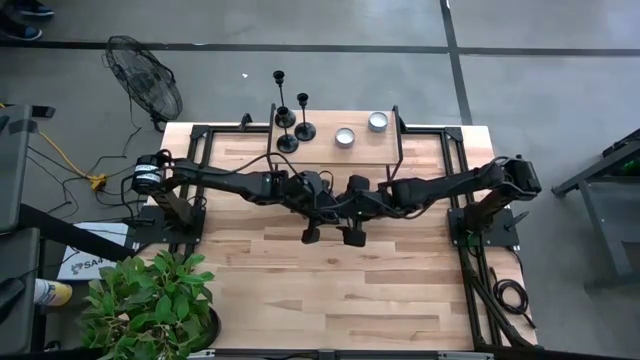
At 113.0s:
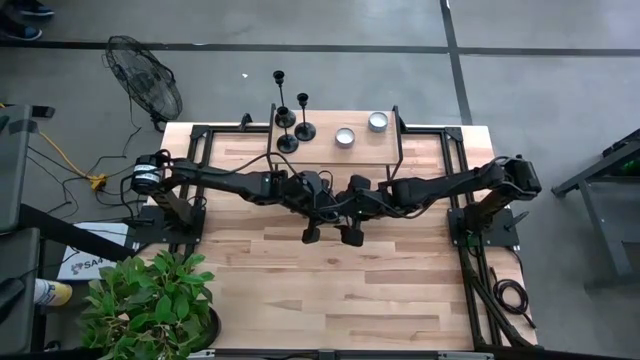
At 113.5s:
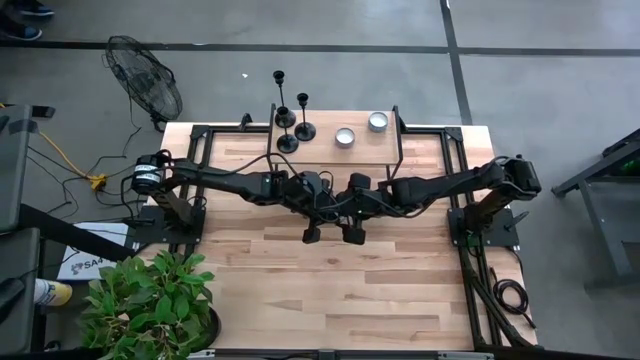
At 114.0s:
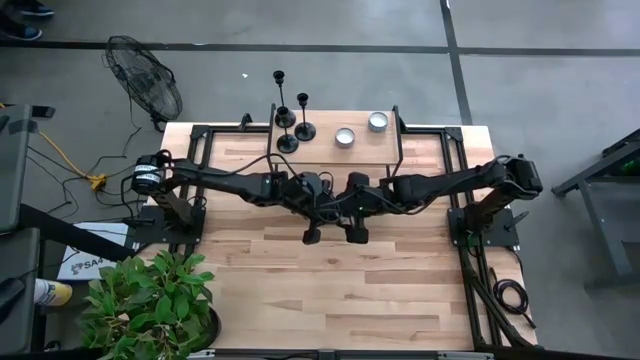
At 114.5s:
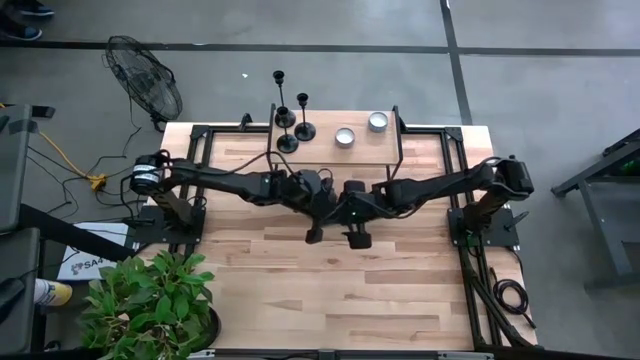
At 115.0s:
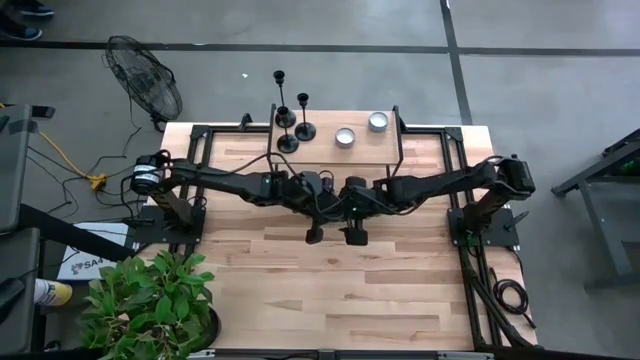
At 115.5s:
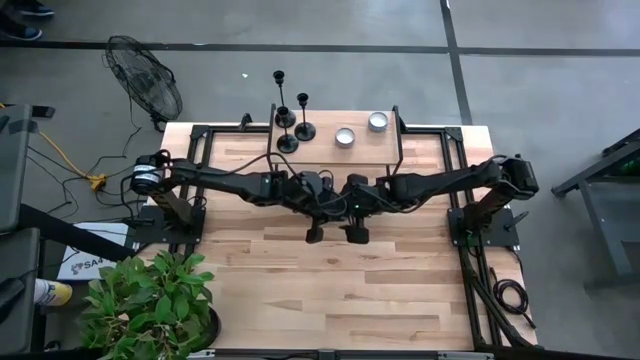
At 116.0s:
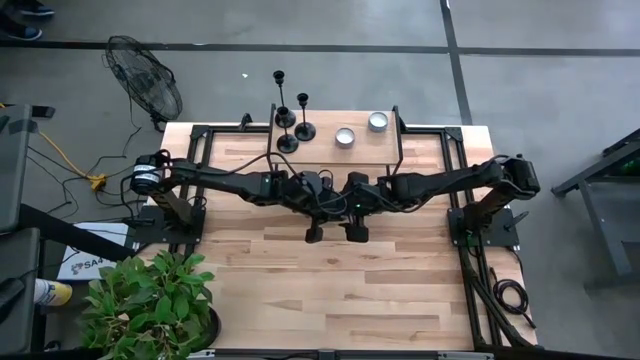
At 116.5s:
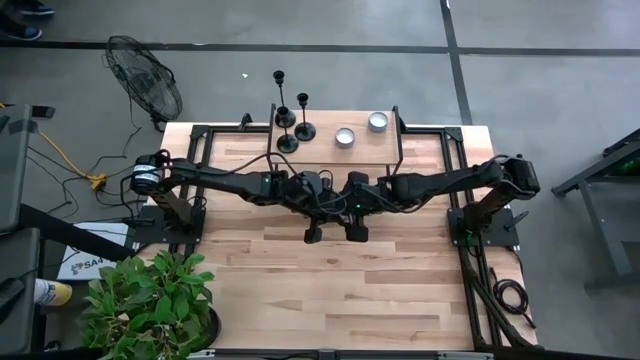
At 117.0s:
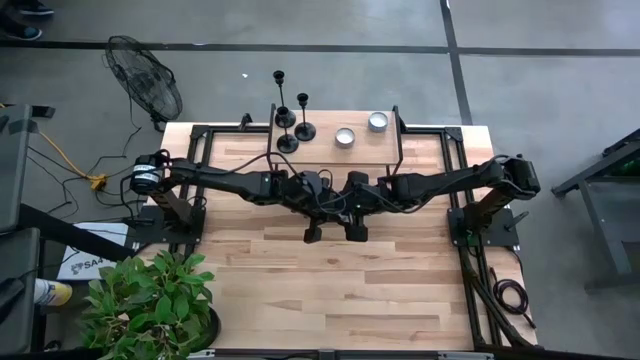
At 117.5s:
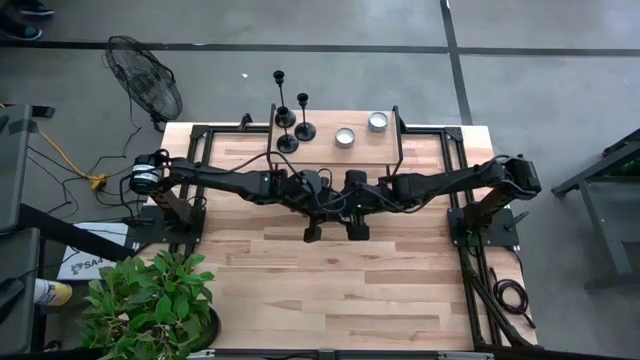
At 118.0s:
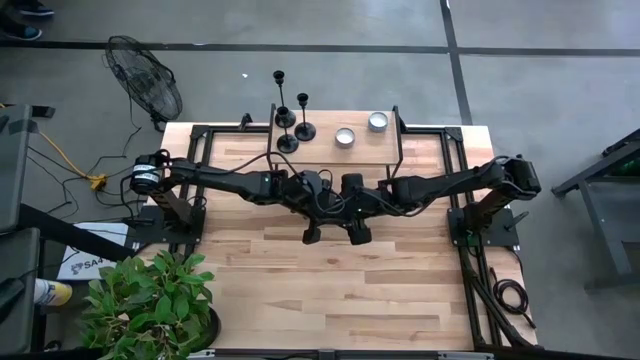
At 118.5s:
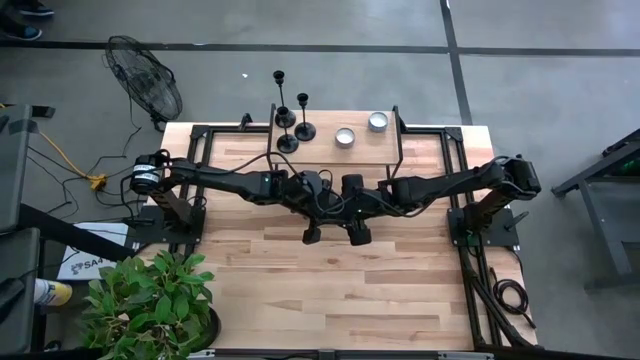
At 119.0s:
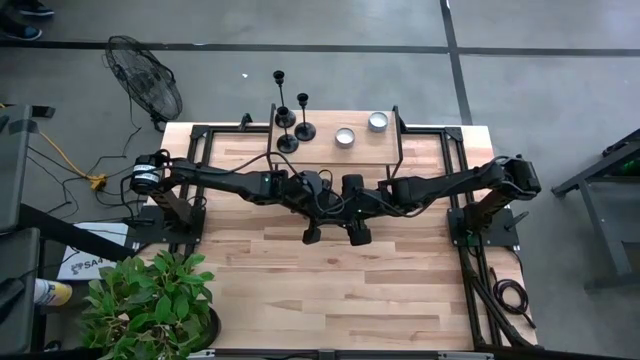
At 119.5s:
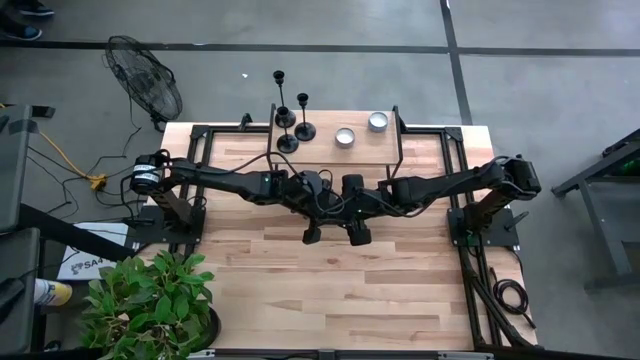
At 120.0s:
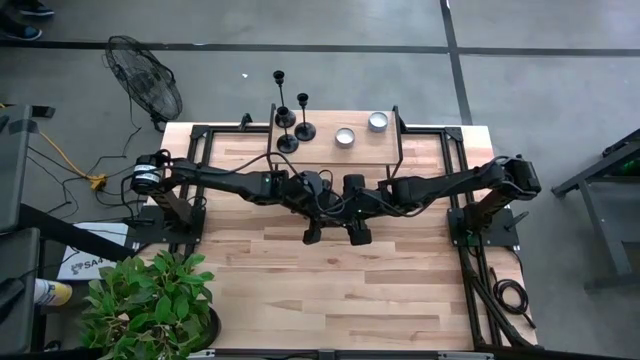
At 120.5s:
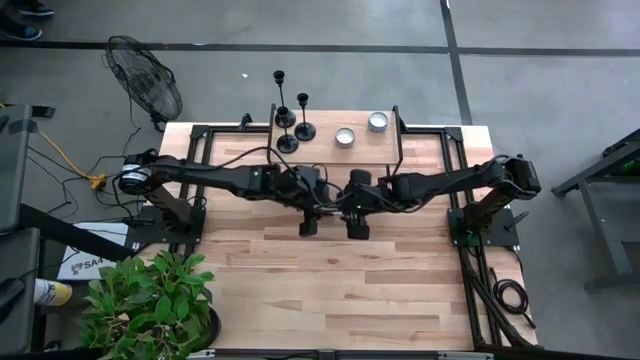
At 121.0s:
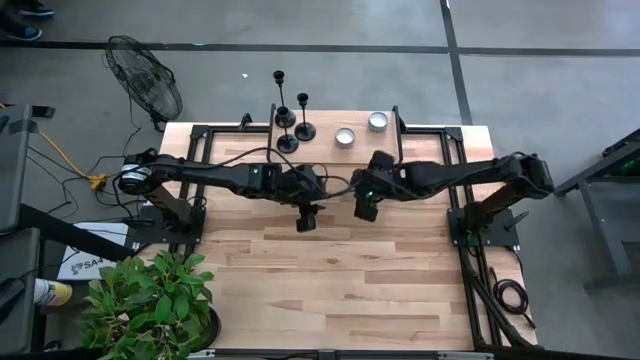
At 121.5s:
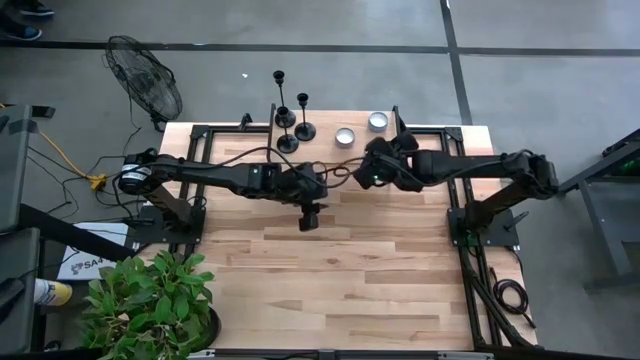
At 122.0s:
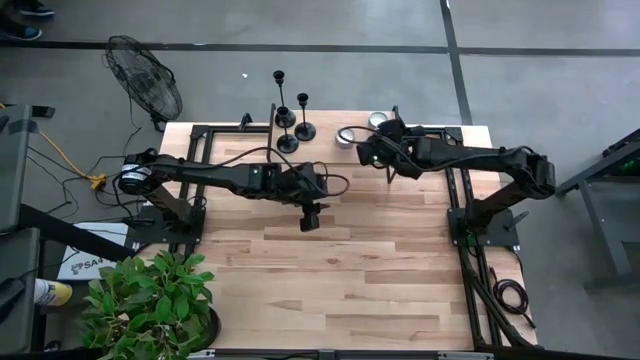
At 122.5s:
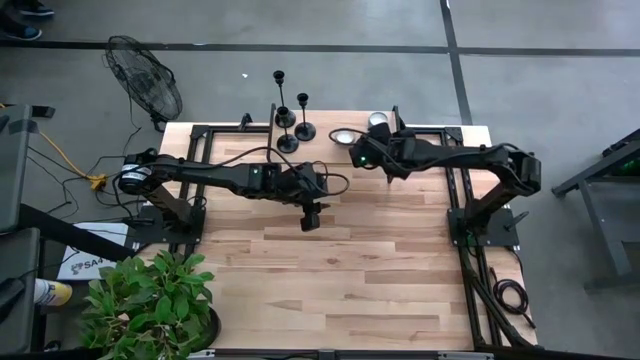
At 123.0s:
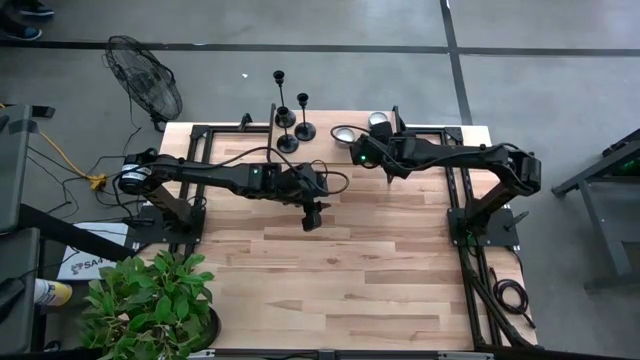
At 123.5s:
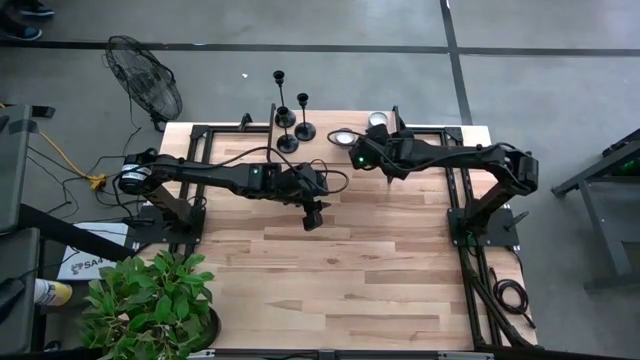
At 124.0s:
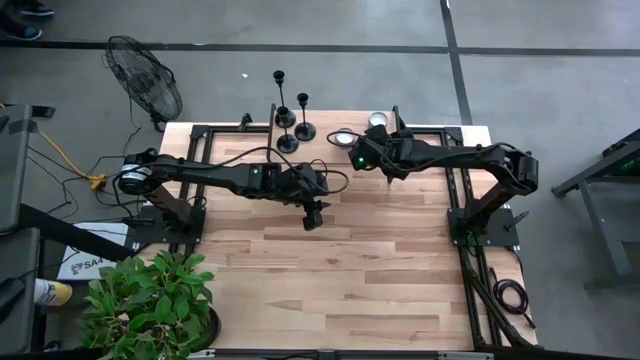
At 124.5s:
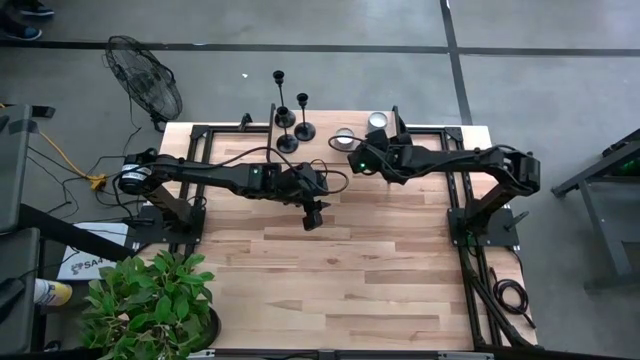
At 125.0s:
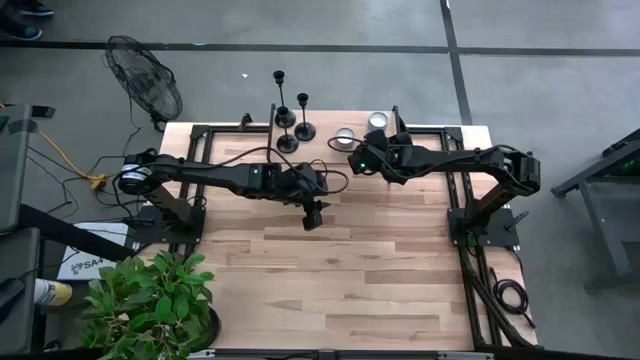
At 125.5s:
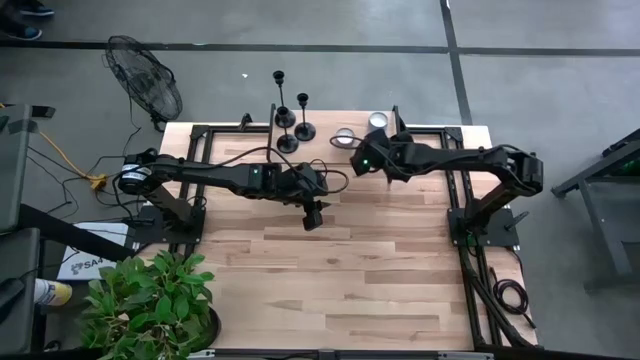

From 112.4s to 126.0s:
Task: Pick & Place candle stick holders
Put the white scented candle on the shelf

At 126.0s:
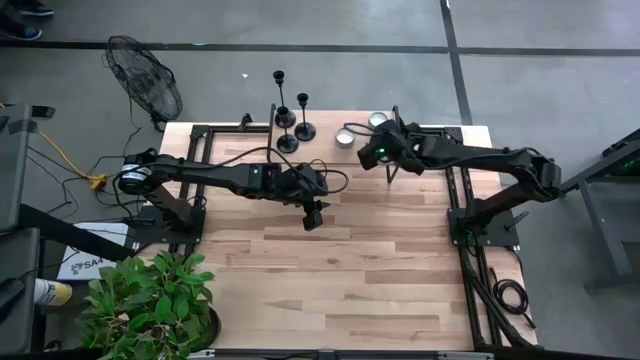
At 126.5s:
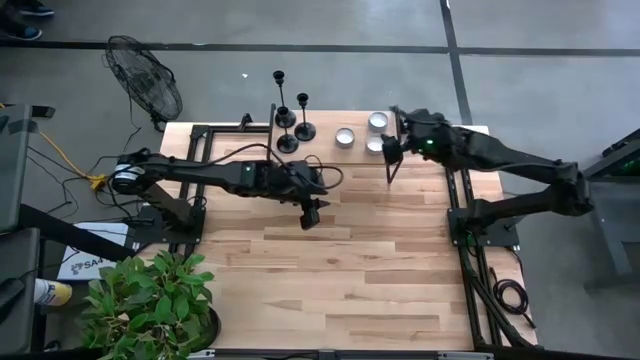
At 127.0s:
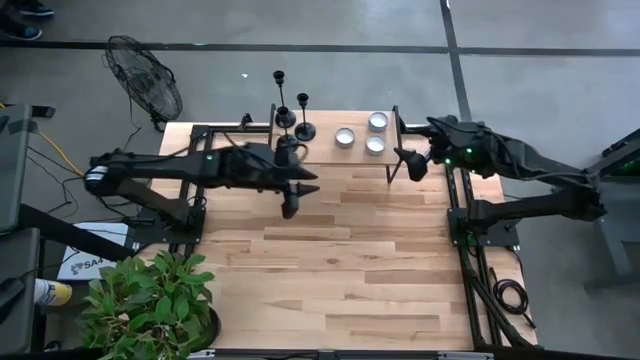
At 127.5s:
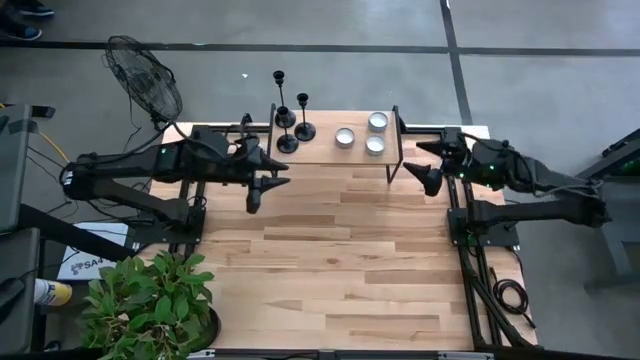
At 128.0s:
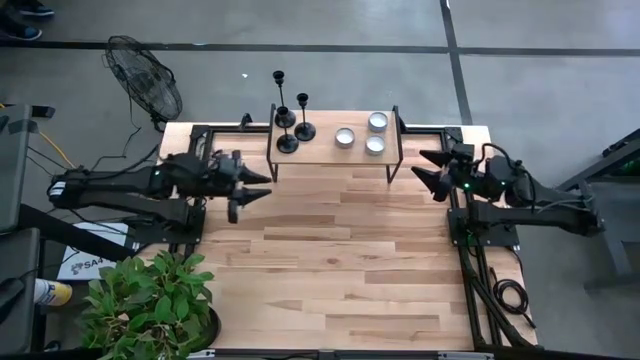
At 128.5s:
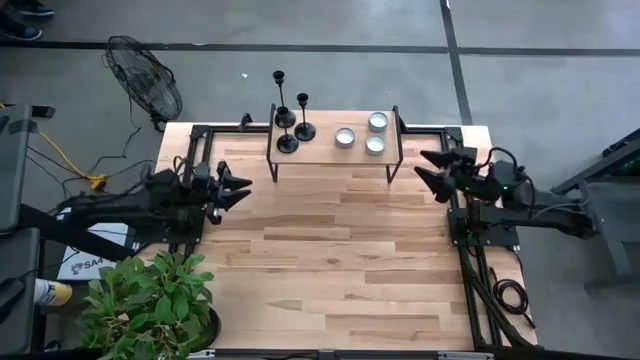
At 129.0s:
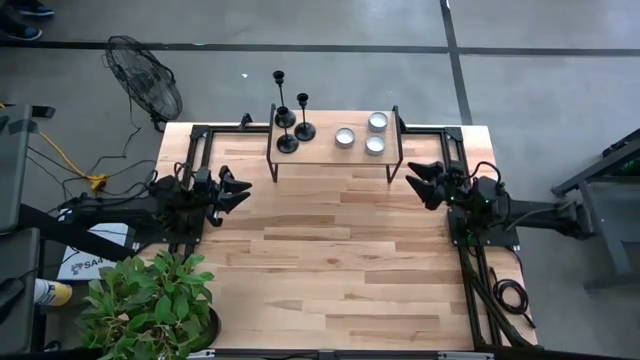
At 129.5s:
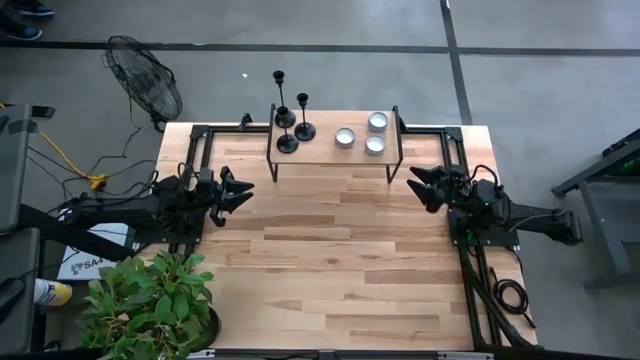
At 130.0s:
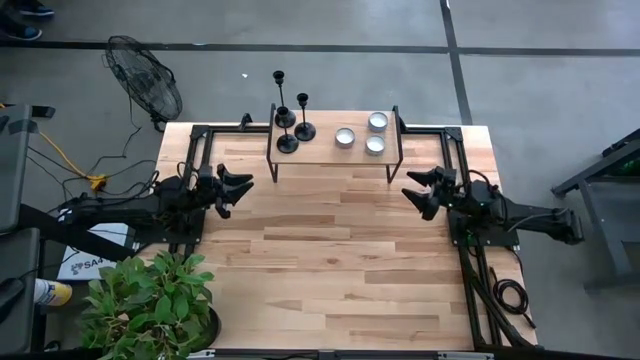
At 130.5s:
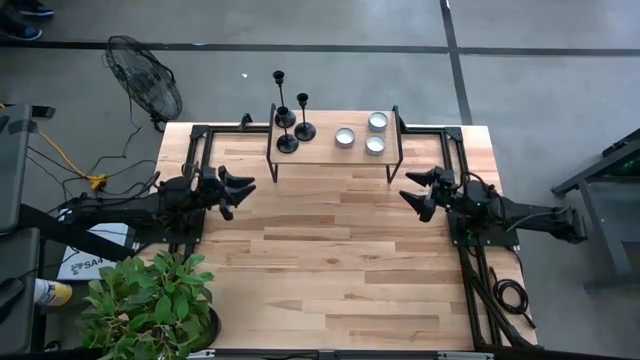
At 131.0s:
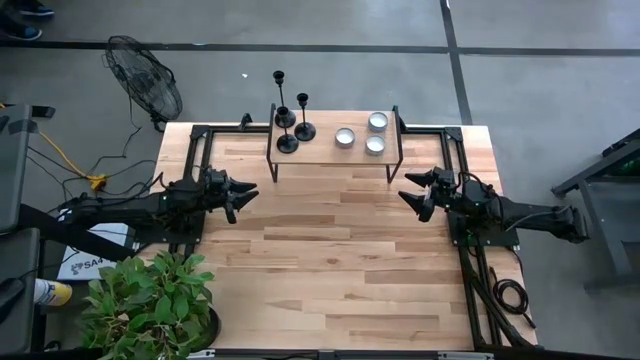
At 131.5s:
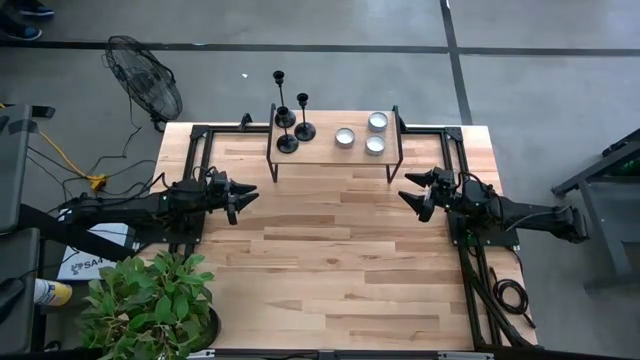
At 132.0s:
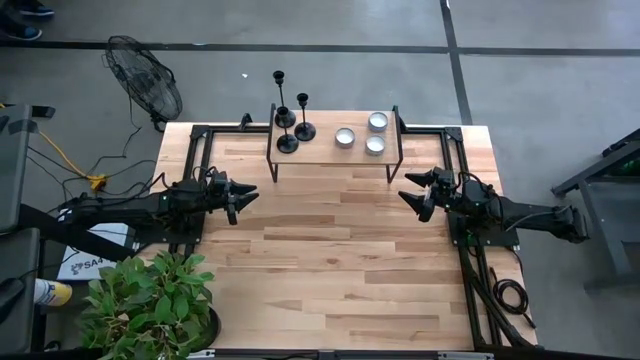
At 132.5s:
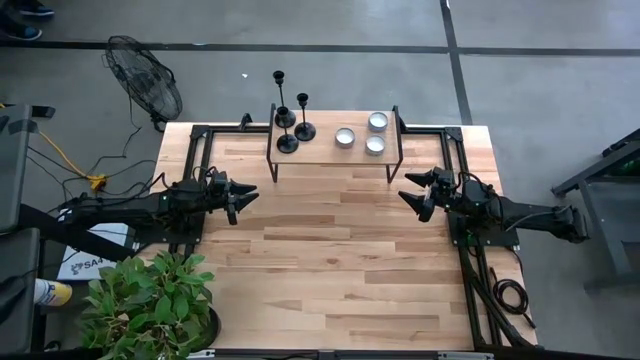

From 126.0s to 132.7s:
Return to Home Position

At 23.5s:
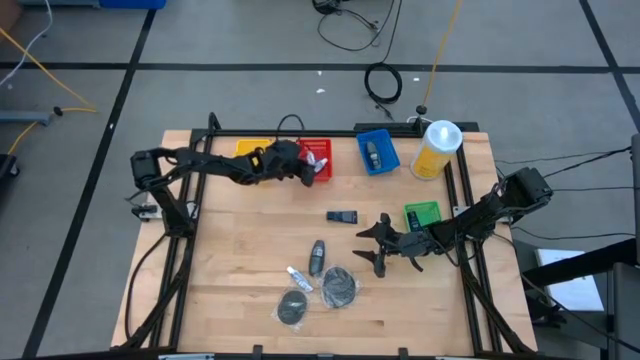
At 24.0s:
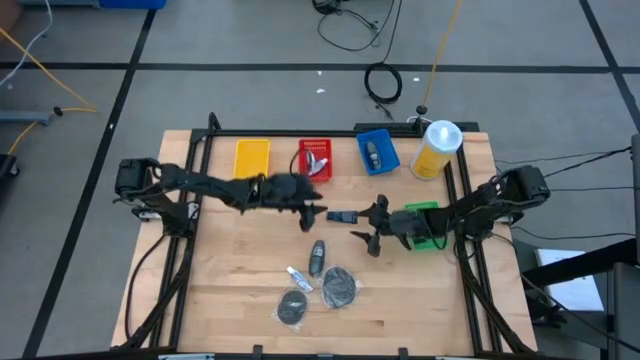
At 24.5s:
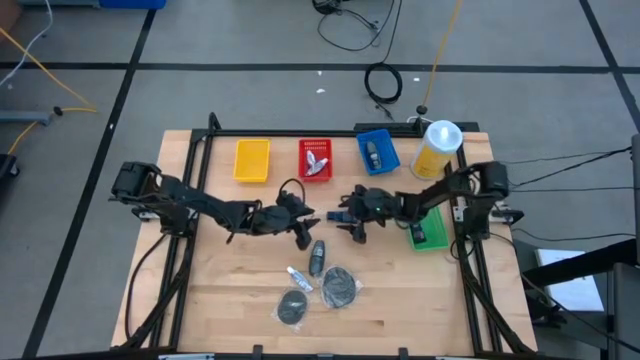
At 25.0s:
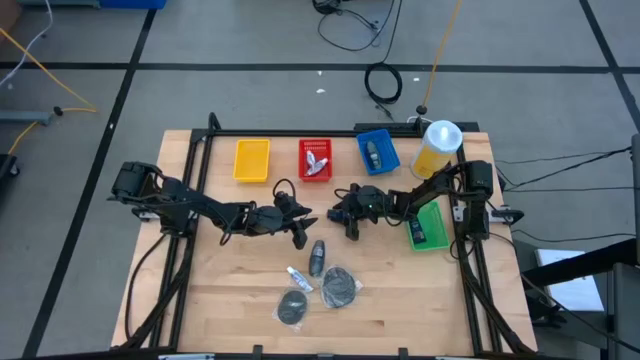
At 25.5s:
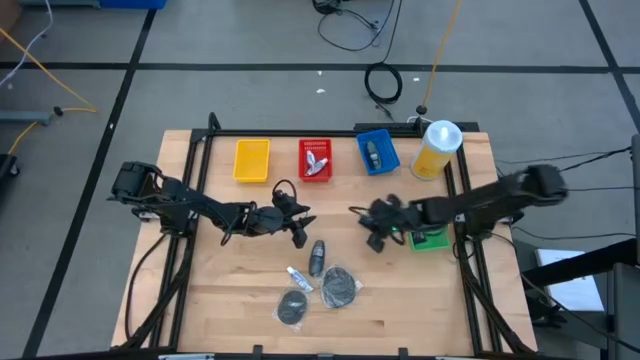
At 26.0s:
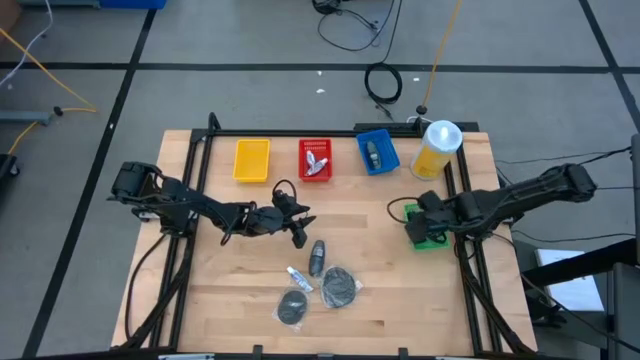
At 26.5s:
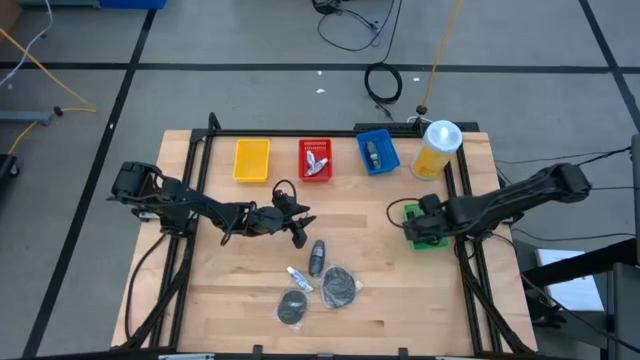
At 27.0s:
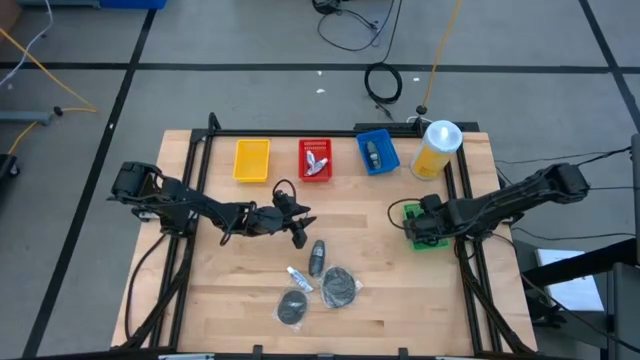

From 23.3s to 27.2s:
Task: Pick & Place Travel size toiletries
Put the blue shave cream into the green bin
